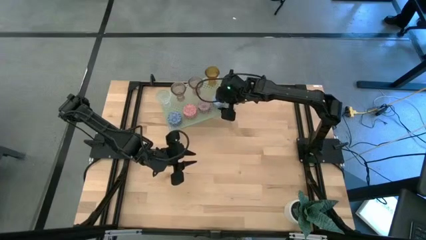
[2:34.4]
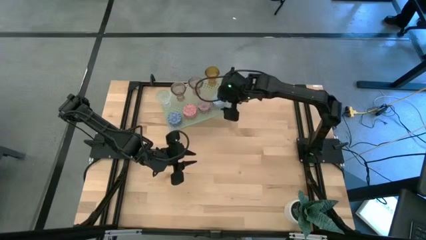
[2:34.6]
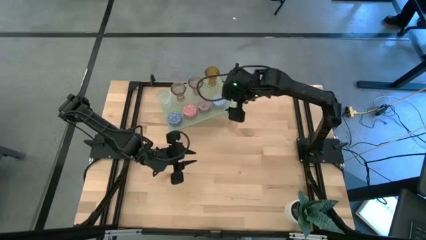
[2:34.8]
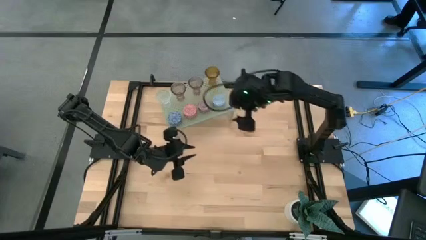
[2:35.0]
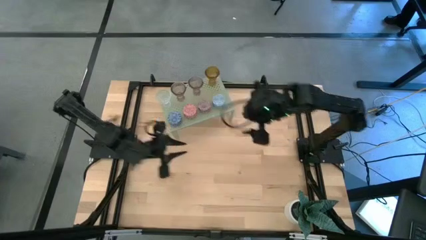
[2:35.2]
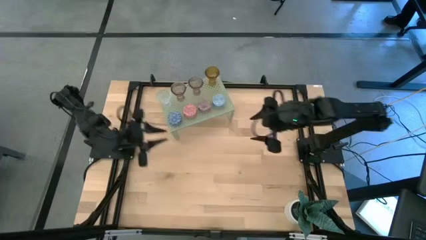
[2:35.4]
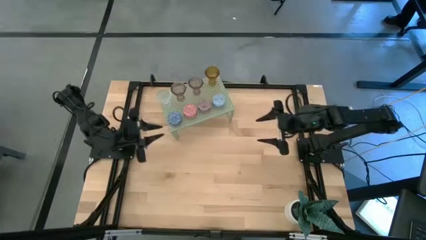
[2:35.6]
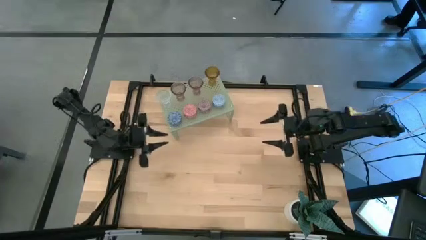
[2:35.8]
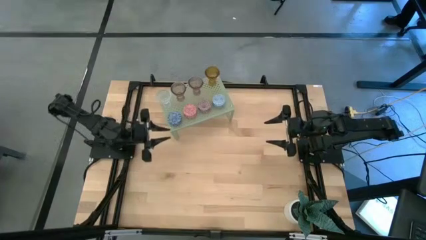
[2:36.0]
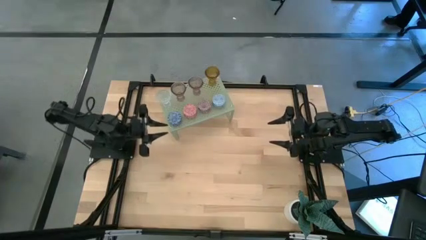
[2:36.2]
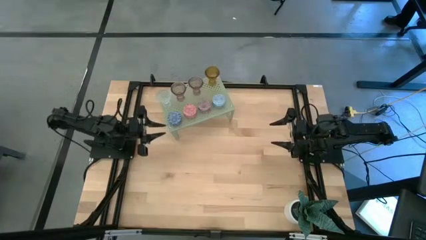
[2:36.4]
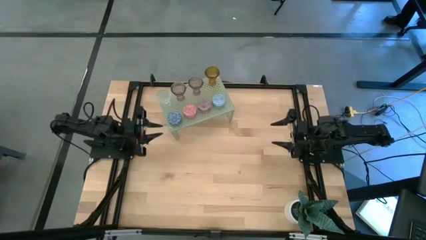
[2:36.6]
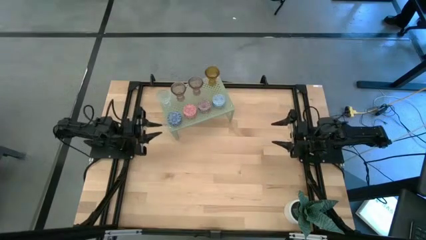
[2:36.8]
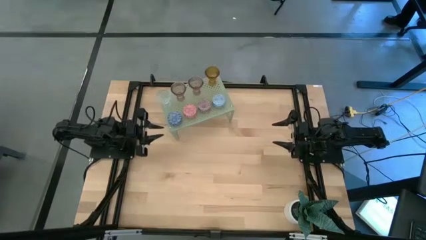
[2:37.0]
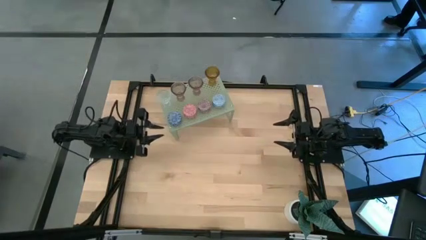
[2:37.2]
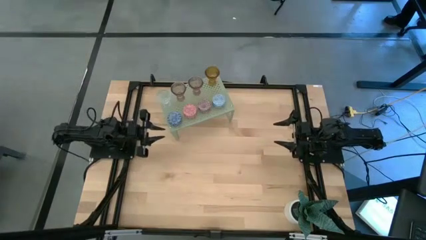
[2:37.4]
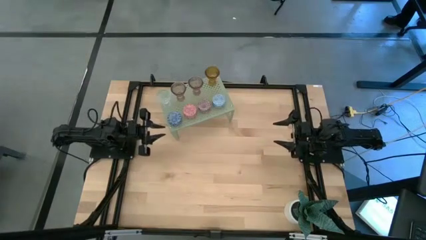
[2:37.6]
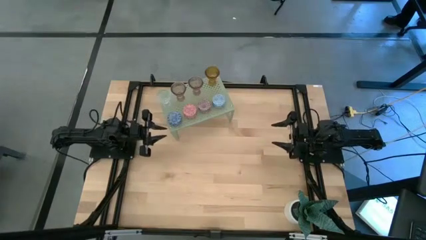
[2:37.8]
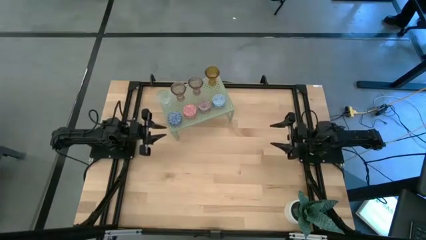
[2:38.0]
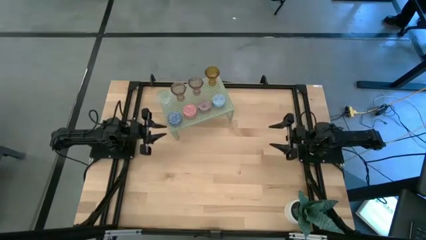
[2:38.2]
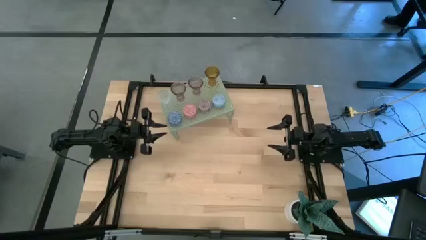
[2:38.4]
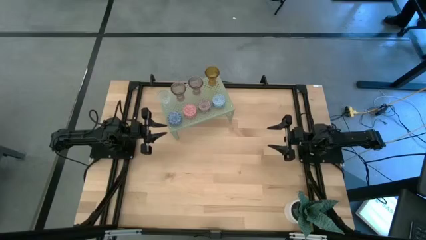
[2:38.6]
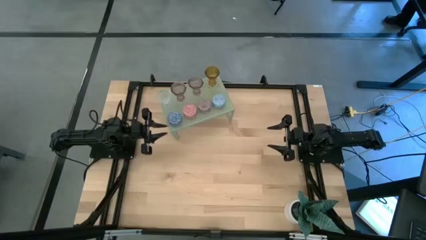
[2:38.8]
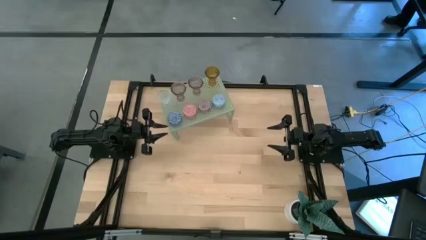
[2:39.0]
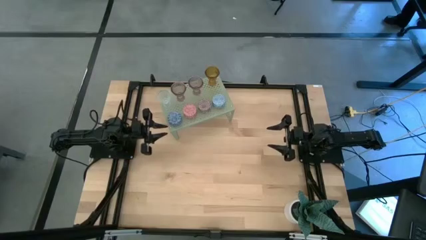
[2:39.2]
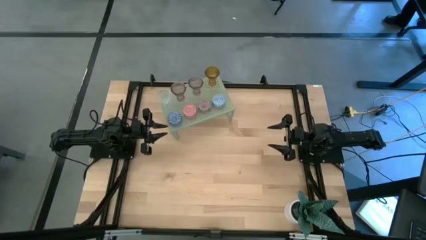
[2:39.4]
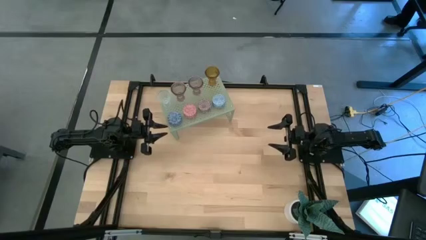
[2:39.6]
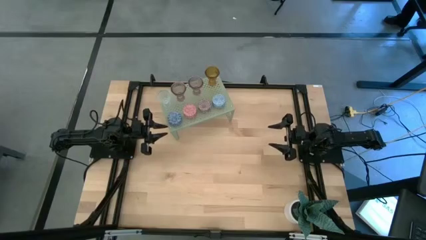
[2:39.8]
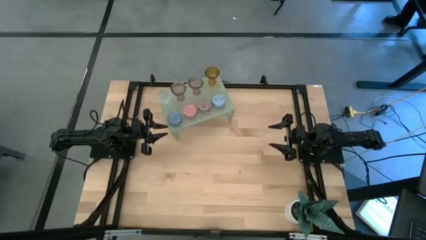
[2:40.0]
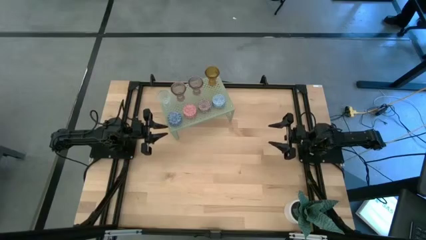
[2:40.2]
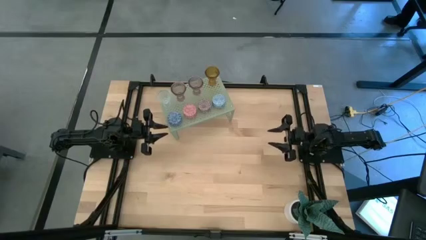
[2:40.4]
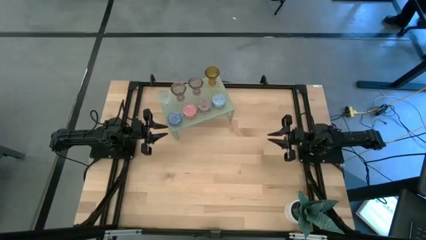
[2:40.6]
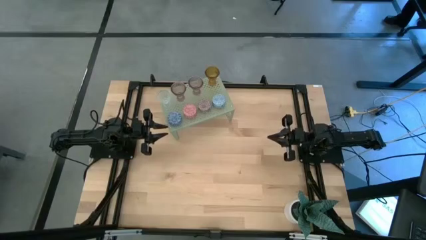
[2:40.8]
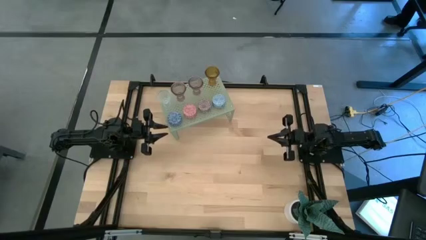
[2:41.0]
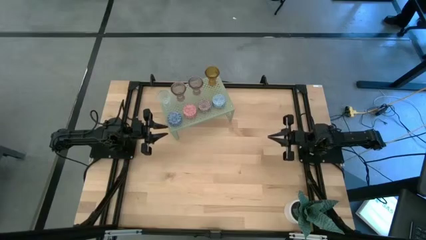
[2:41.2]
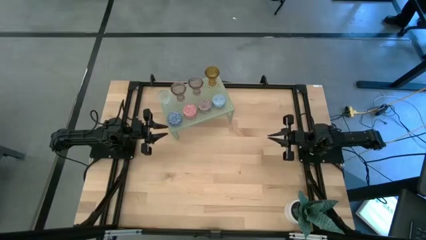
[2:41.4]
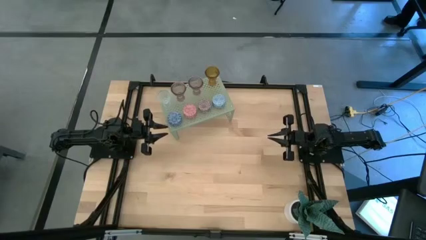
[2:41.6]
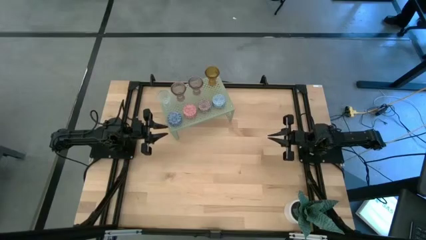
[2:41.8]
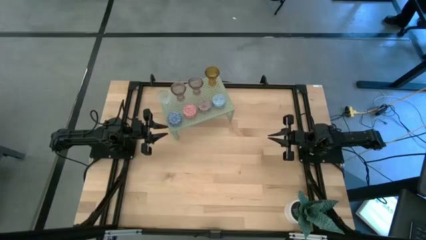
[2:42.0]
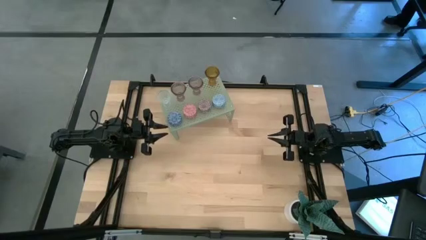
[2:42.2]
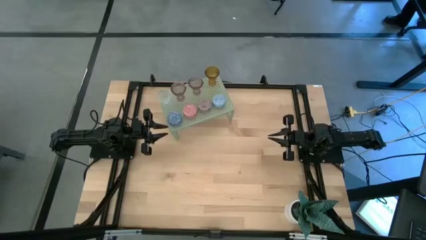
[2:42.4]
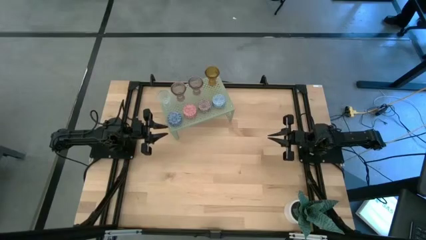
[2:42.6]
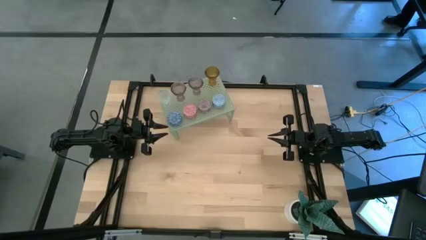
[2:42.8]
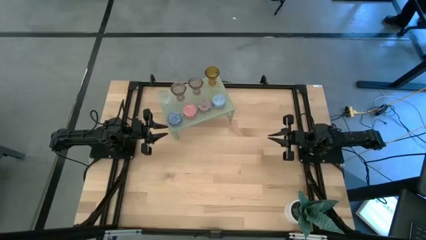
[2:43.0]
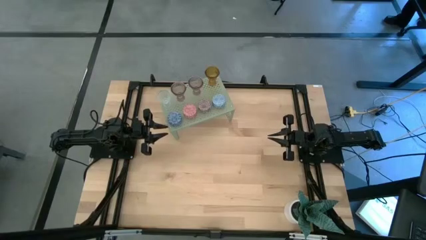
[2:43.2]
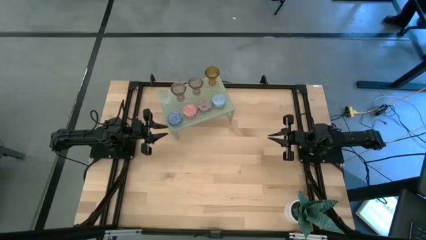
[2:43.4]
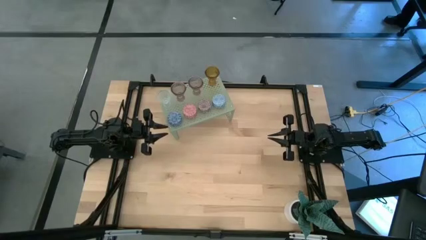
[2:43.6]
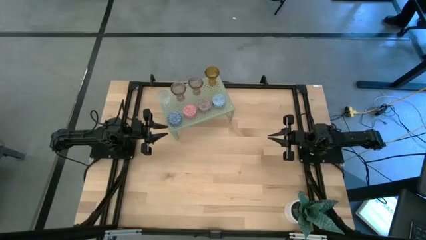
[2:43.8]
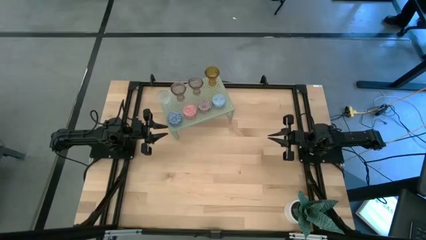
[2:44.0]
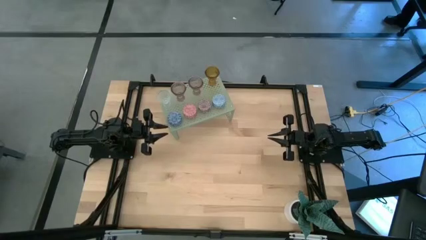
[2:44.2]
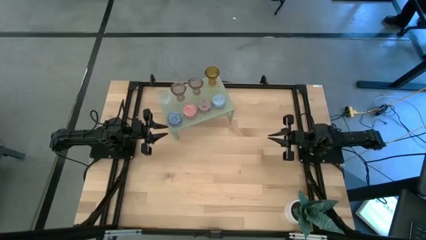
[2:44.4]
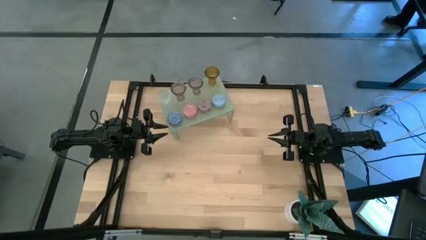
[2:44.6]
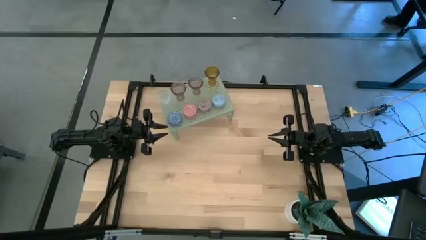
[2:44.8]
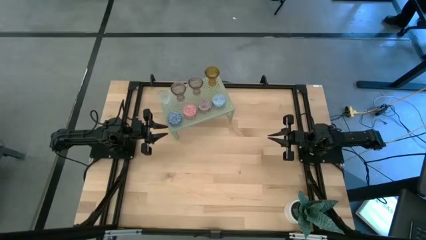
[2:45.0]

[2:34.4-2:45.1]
Task: Pick & Place candle stick holders
Return to Home Position
